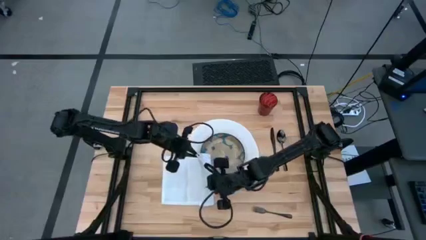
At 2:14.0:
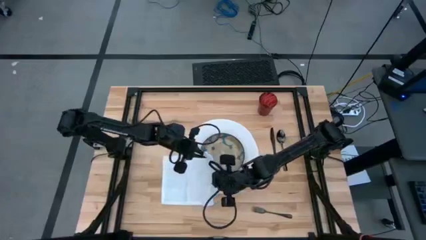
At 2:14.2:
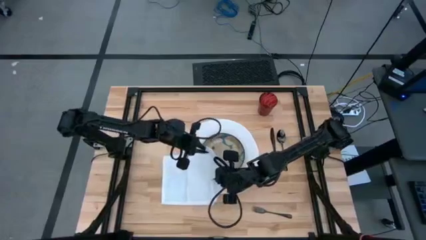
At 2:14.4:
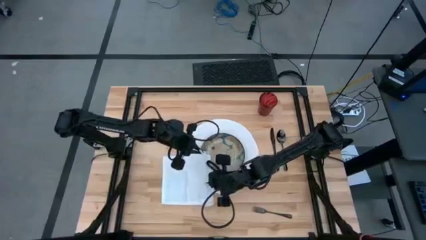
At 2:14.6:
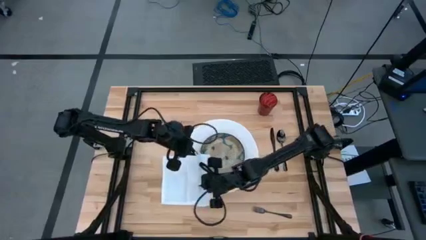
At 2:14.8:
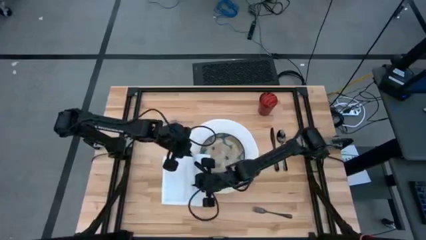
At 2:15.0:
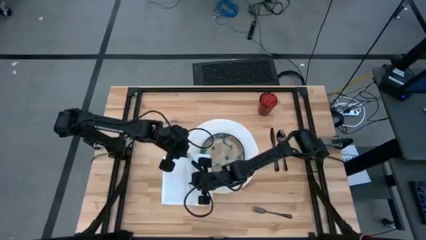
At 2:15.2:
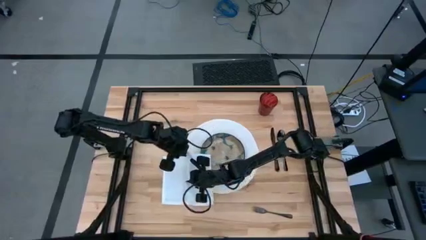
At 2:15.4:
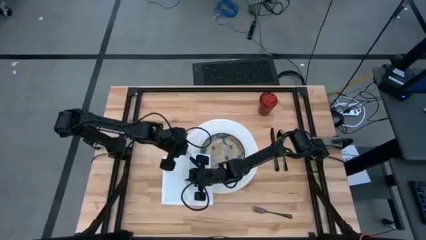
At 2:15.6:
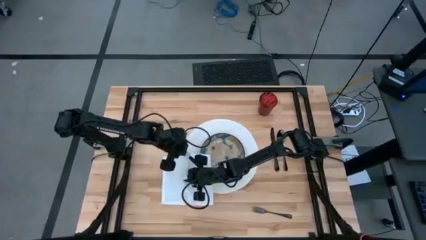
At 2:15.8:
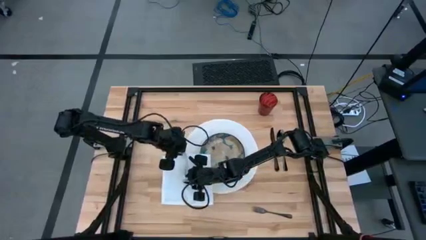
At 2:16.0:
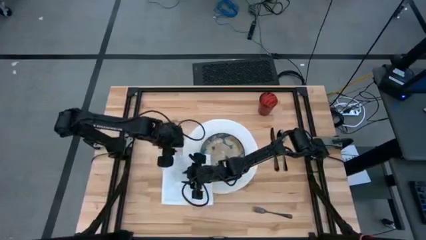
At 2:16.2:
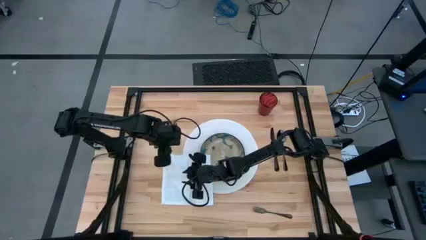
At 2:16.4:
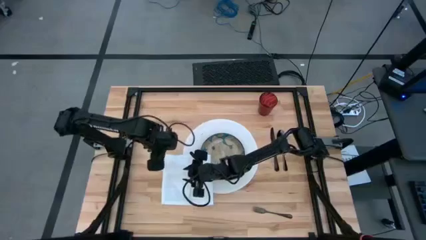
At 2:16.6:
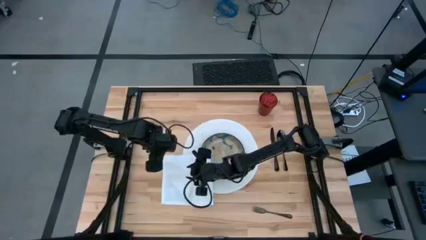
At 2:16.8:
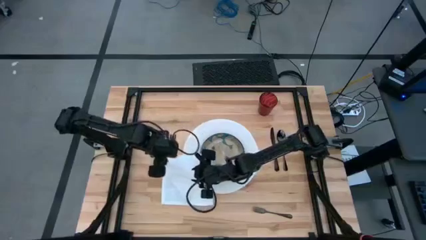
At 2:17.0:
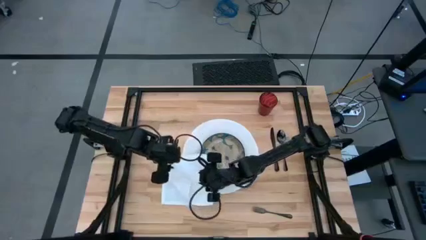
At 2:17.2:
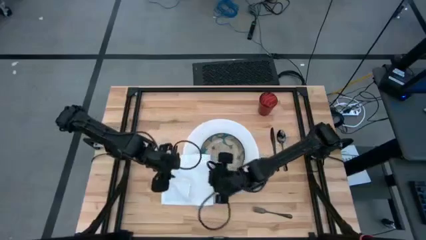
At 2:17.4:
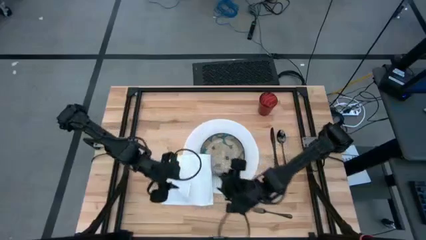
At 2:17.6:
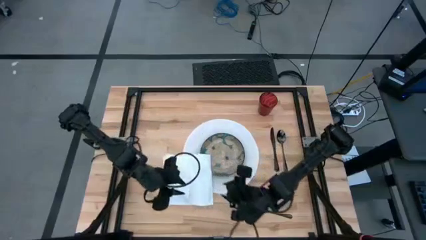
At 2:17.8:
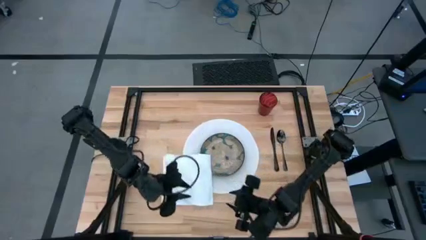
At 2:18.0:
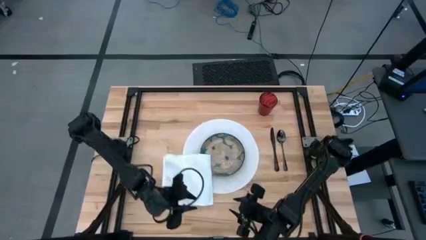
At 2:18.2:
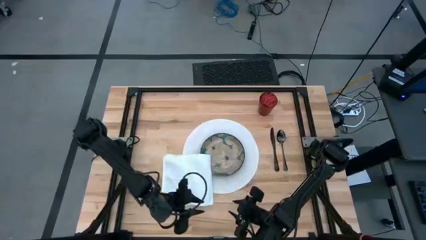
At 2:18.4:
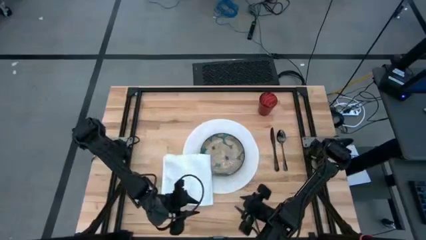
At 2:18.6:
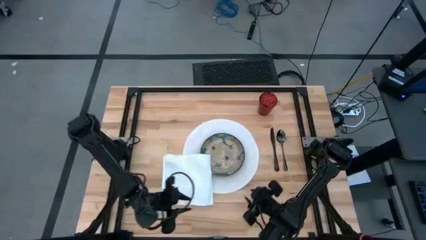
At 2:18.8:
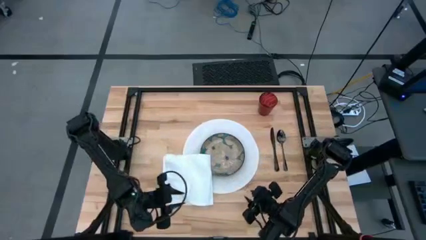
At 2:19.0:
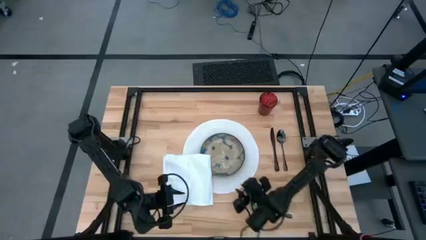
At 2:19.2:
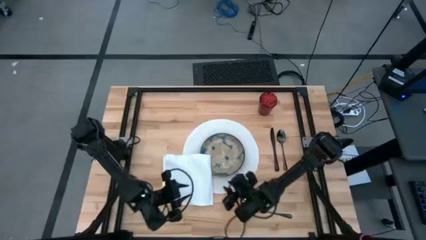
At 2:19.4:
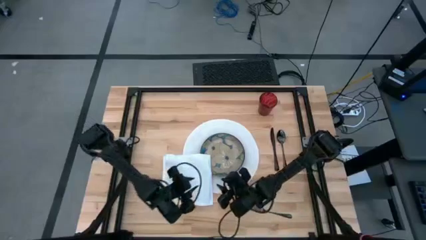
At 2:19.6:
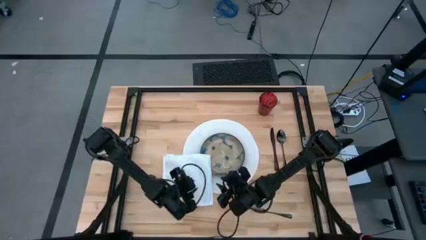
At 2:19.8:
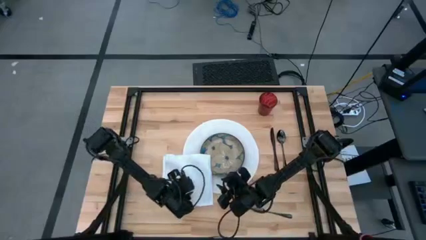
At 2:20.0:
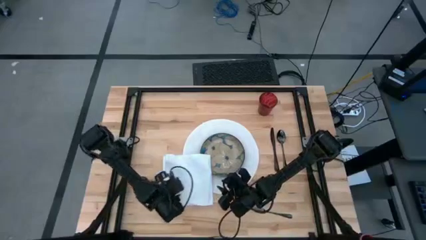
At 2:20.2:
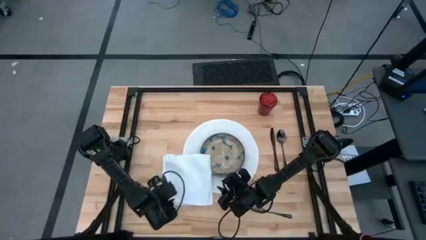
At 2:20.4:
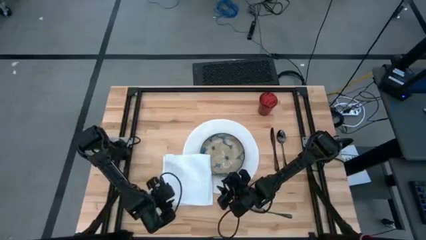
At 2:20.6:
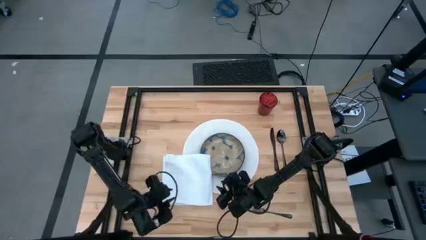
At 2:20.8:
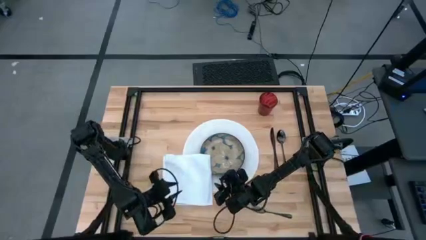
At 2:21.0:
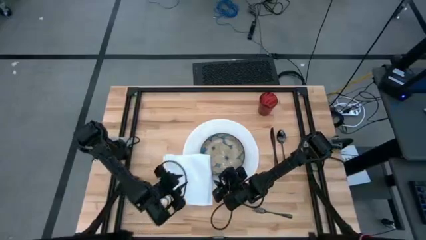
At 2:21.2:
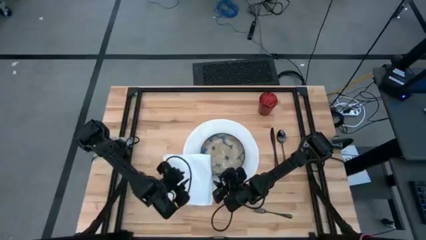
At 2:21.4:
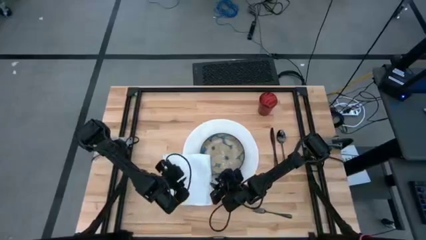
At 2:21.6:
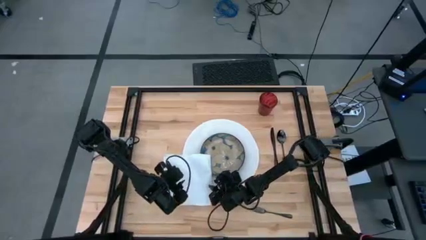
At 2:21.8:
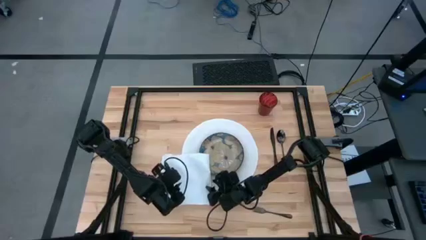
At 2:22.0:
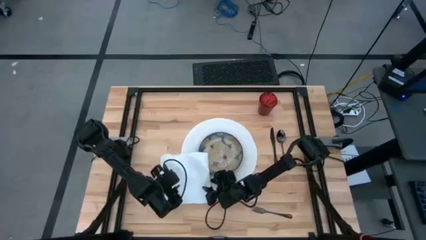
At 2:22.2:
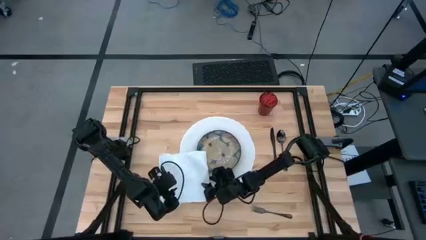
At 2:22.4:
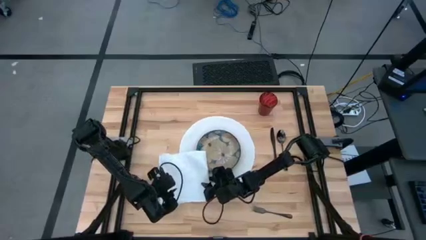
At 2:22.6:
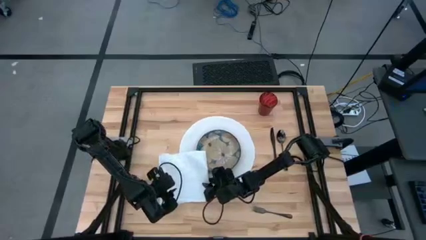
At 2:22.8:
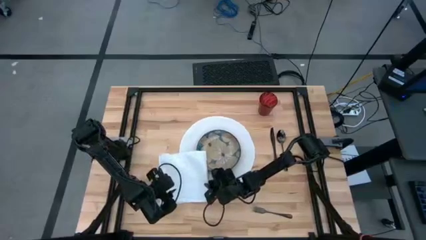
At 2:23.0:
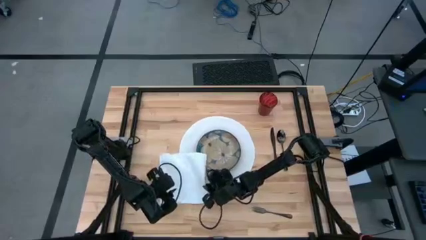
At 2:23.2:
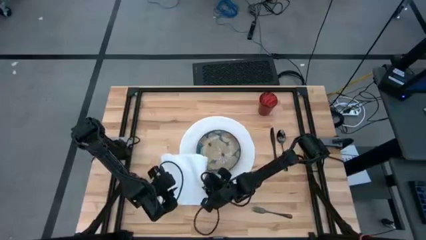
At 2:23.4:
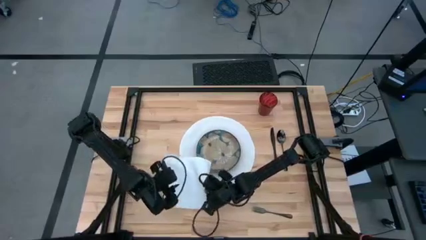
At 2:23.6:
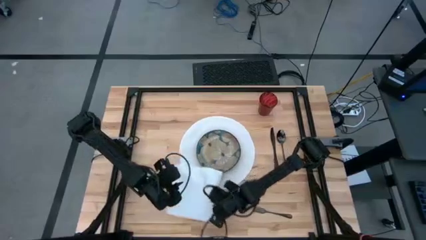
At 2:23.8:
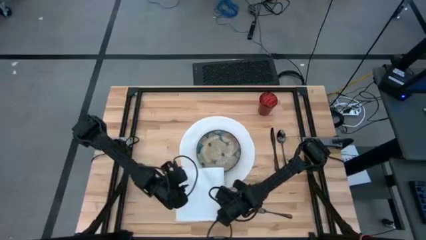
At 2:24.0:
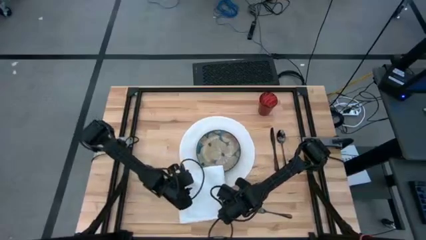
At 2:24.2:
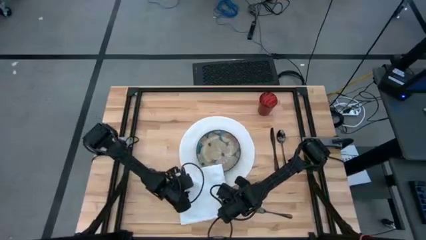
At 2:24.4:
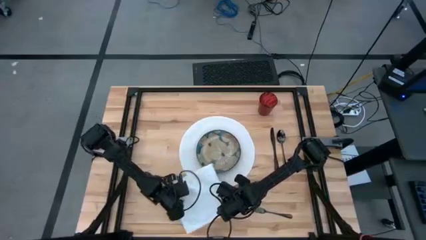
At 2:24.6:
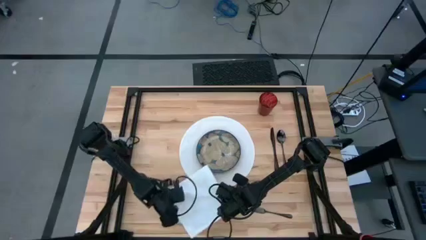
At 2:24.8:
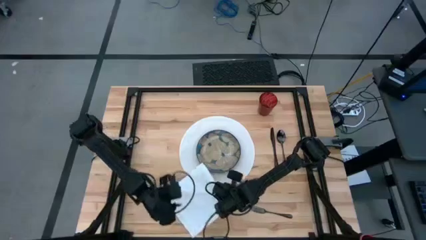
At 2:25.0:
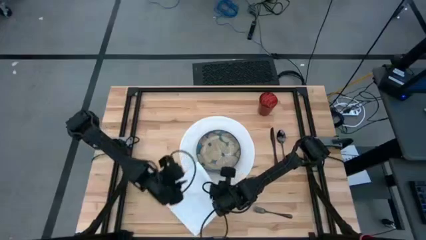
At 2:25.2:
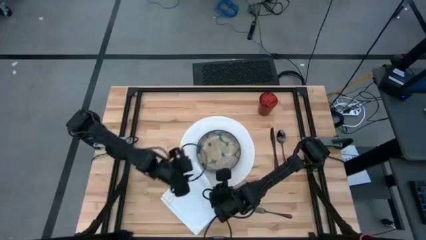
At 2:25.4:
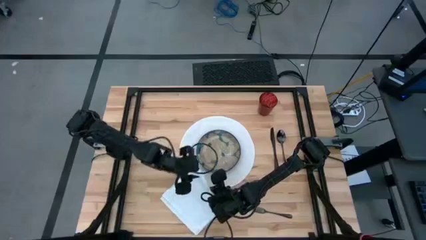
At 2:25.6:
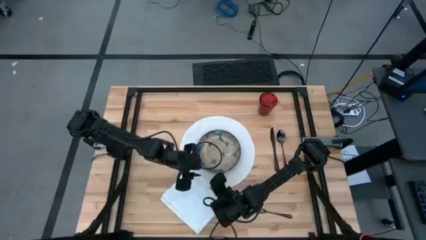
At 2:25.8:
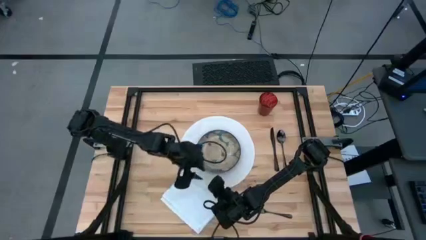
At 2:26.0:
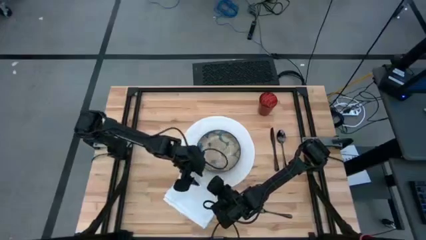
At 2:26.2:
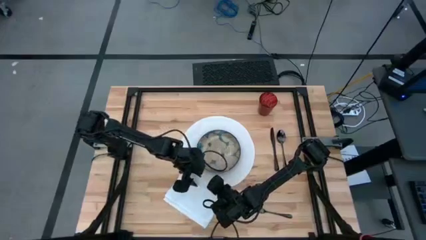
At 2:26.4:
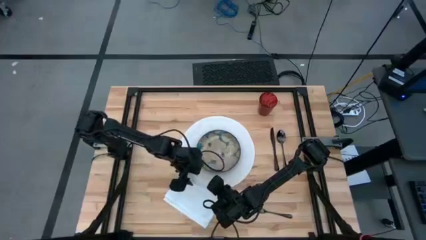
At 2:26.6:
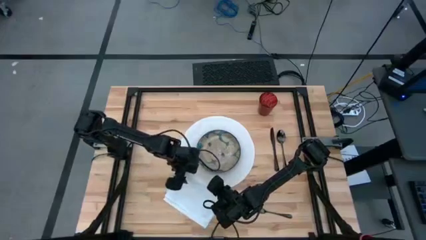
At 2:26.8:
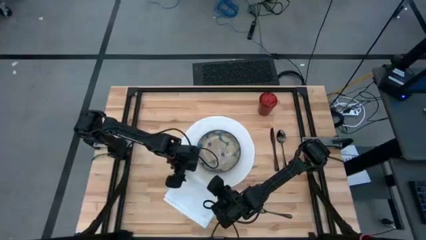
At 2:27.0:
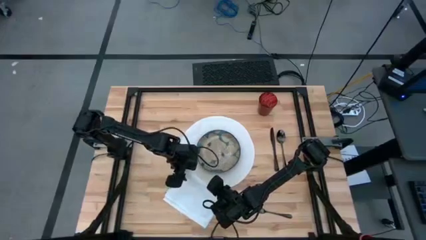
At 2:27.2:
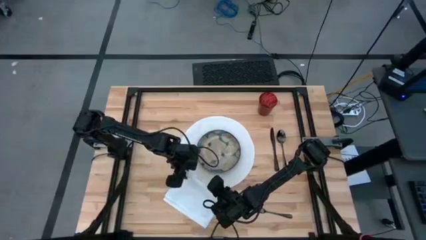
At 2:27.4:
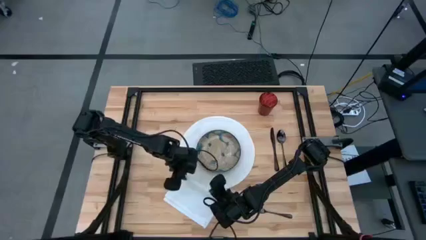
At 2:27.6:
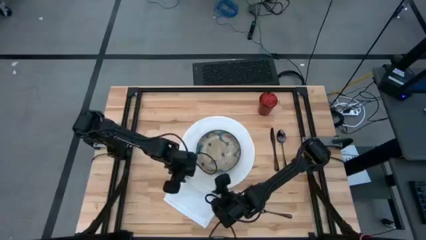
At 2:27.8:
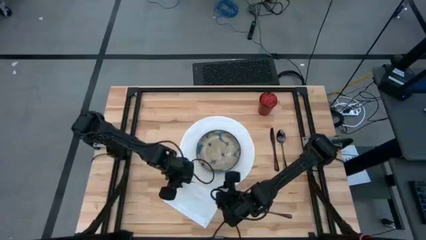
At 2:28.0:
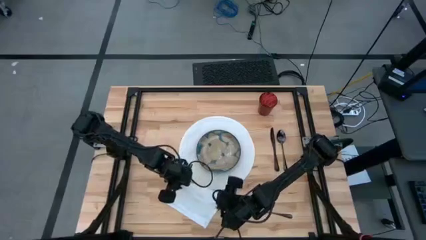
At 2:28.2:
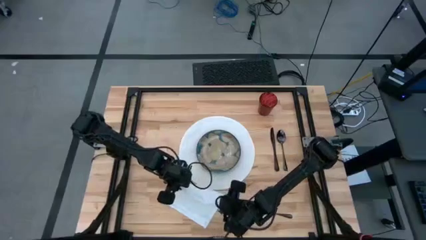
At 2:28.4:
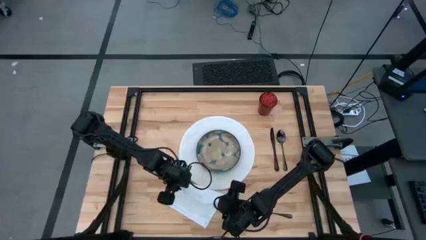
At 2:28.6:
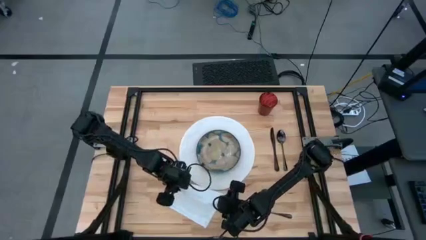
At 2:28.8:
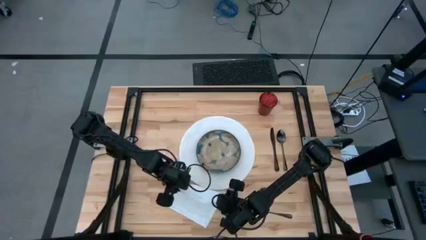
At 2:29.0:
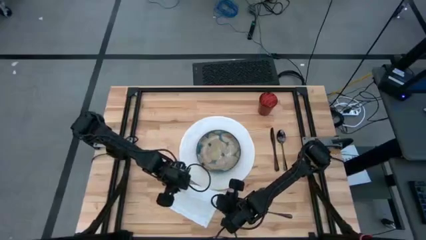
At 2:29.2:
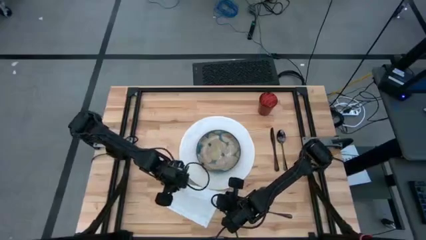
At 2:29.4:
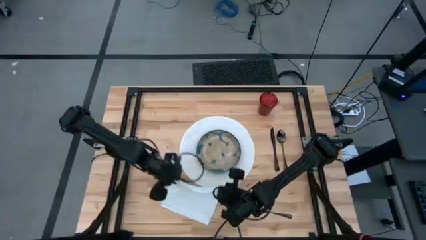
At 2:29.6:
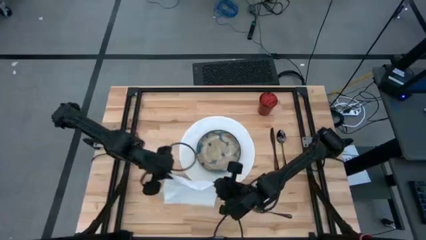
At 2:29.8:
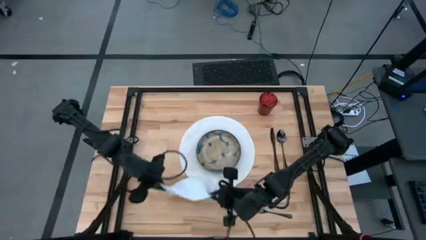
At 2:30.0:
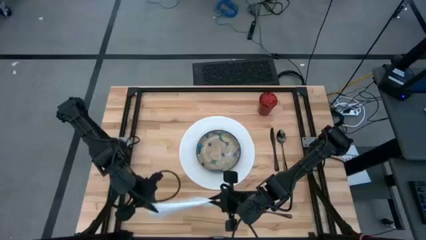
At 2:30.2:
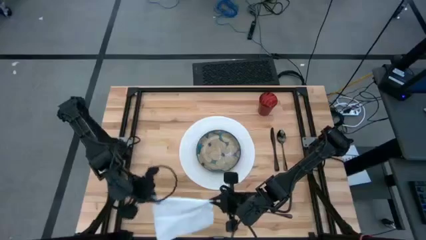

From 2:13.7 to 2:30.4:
Task: Set table place
Fold the white table napkin
